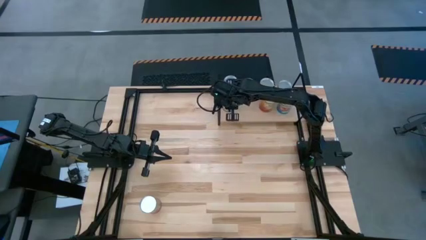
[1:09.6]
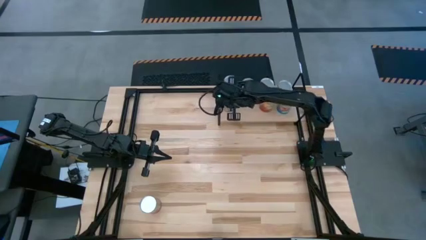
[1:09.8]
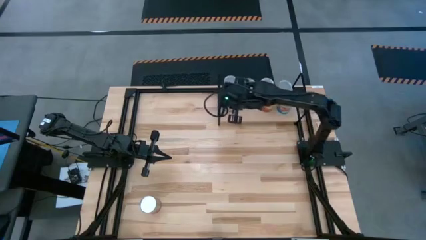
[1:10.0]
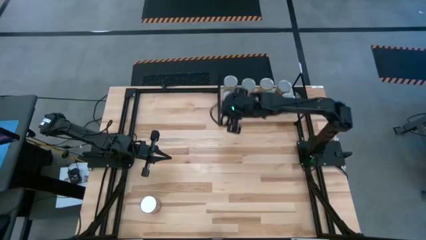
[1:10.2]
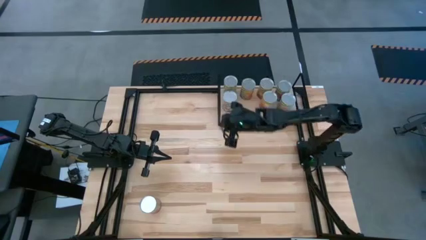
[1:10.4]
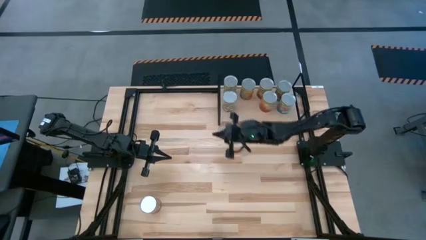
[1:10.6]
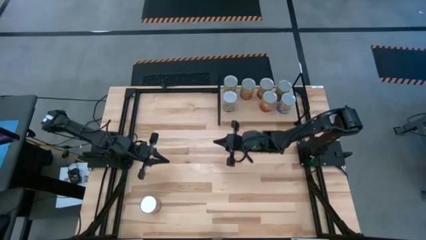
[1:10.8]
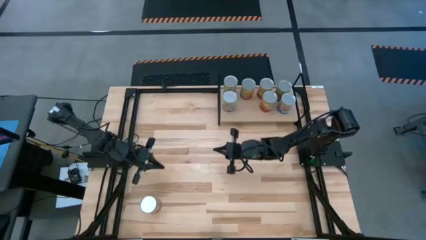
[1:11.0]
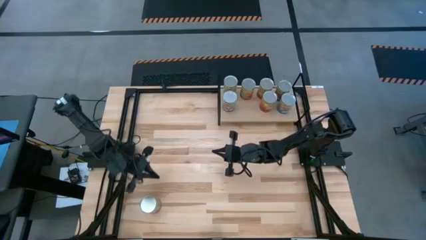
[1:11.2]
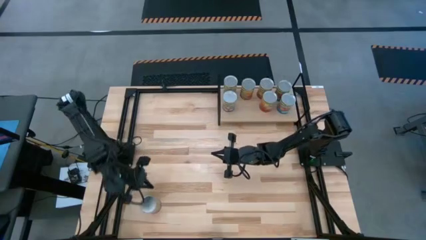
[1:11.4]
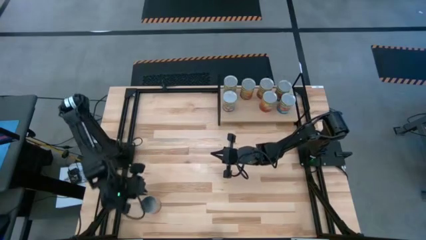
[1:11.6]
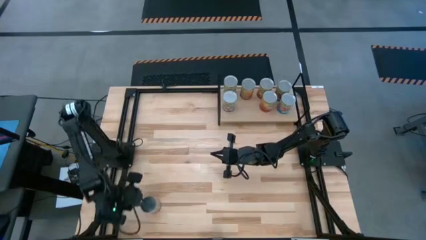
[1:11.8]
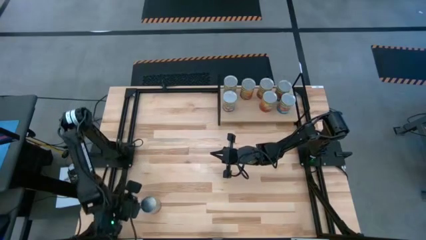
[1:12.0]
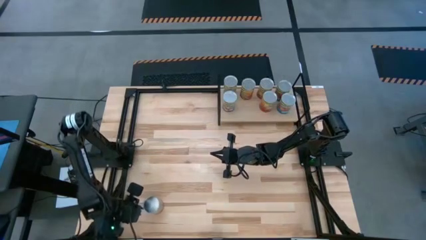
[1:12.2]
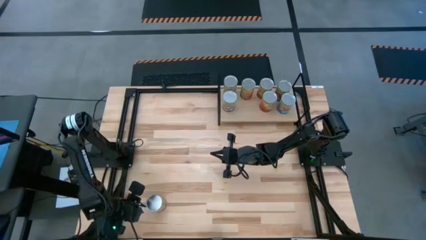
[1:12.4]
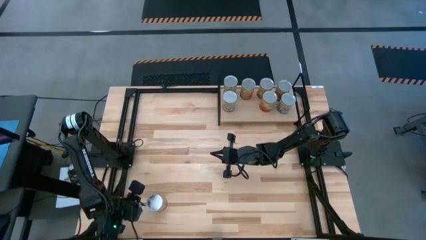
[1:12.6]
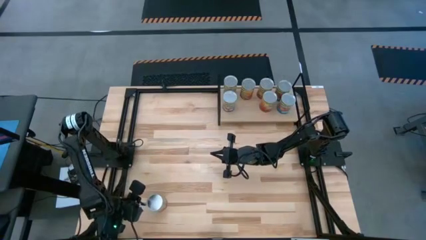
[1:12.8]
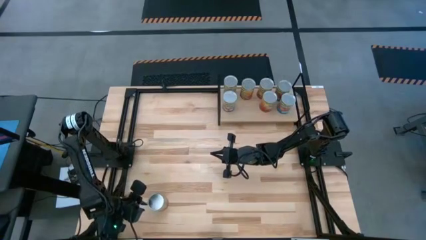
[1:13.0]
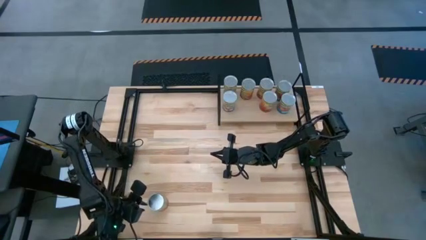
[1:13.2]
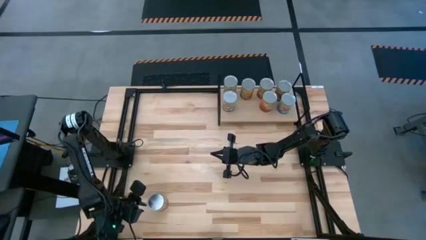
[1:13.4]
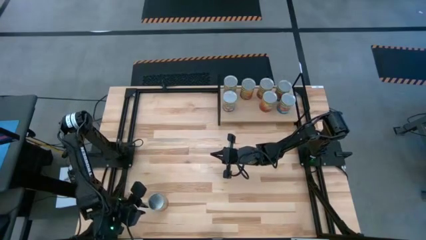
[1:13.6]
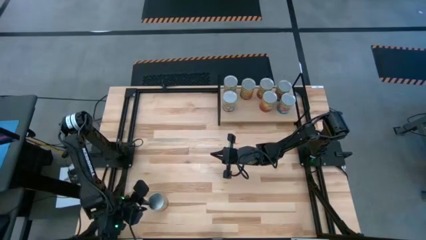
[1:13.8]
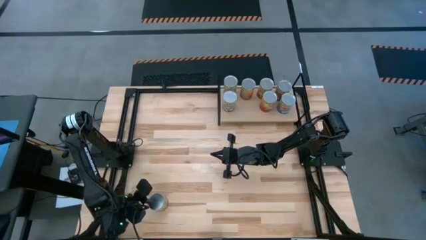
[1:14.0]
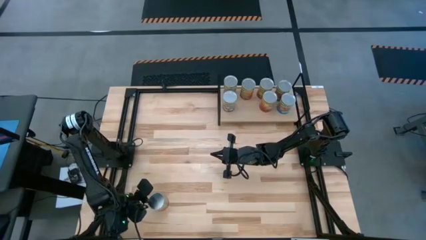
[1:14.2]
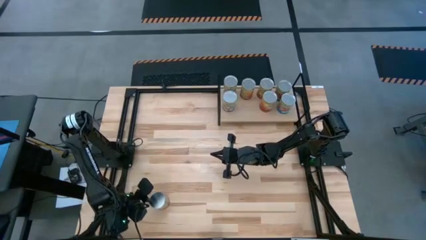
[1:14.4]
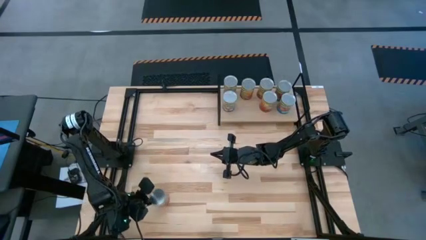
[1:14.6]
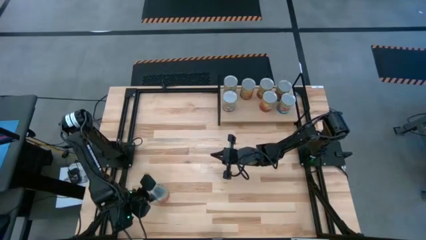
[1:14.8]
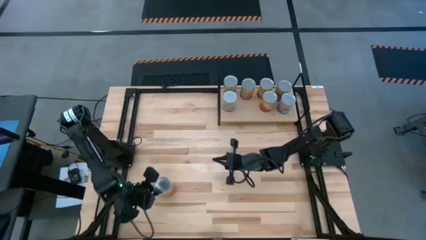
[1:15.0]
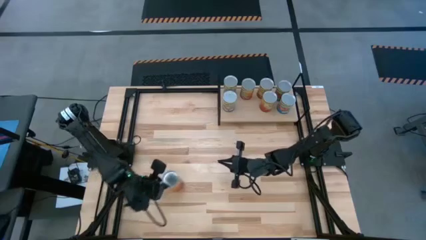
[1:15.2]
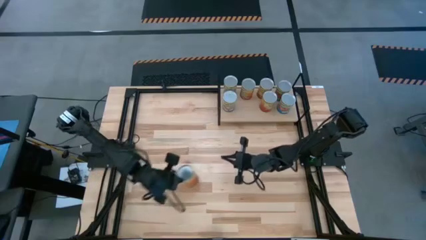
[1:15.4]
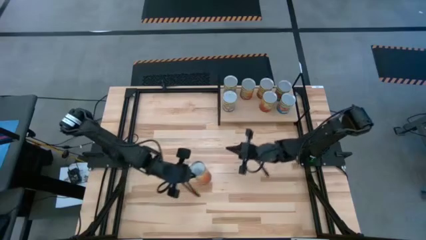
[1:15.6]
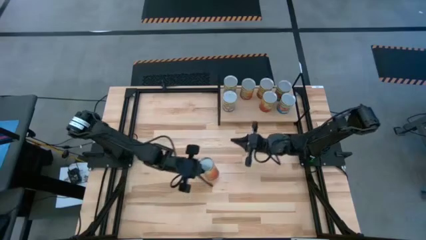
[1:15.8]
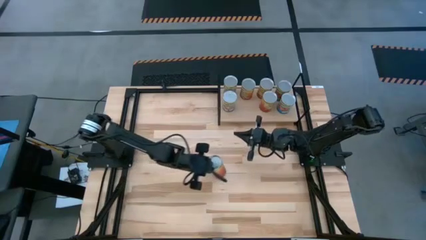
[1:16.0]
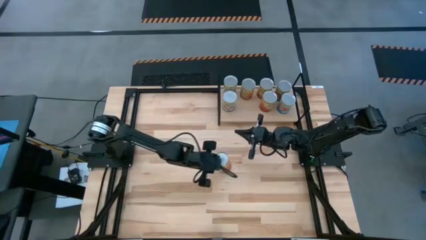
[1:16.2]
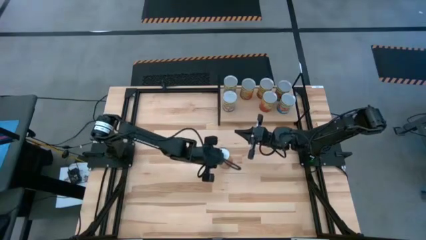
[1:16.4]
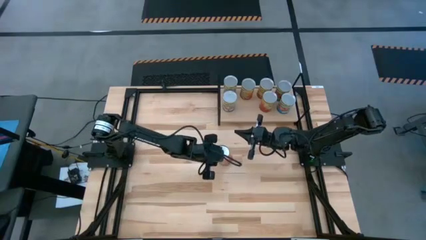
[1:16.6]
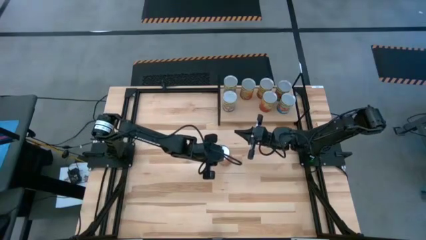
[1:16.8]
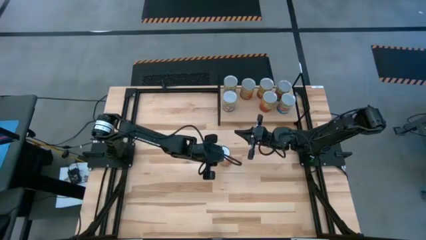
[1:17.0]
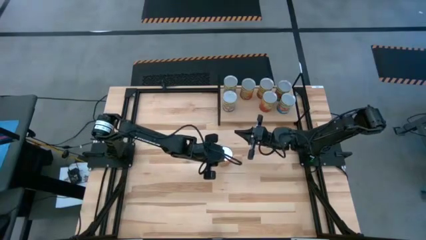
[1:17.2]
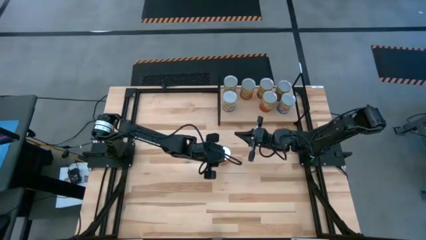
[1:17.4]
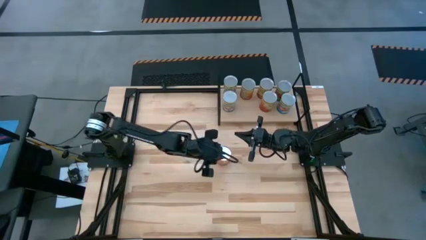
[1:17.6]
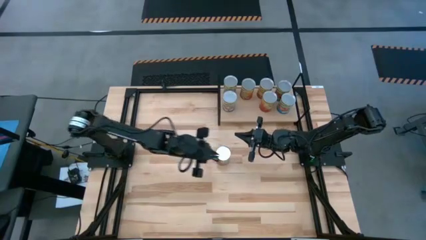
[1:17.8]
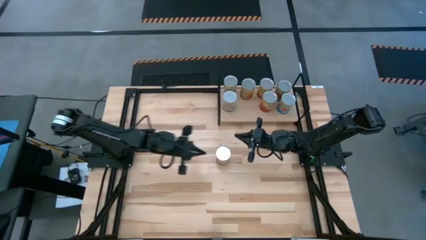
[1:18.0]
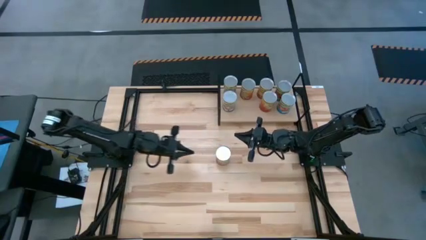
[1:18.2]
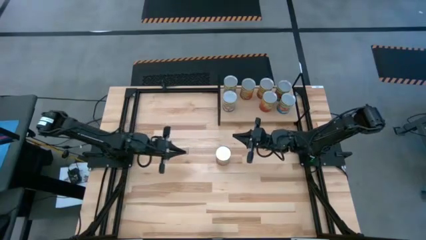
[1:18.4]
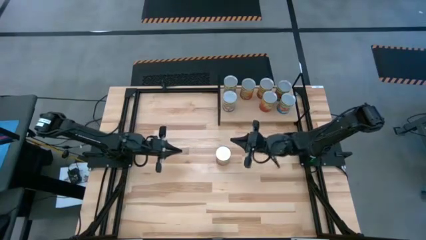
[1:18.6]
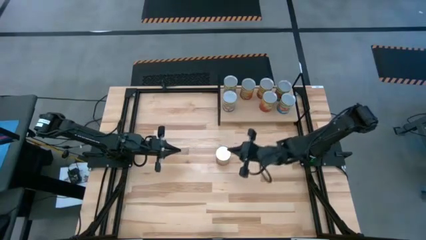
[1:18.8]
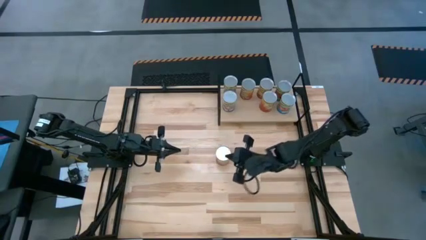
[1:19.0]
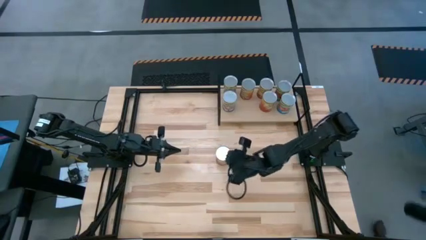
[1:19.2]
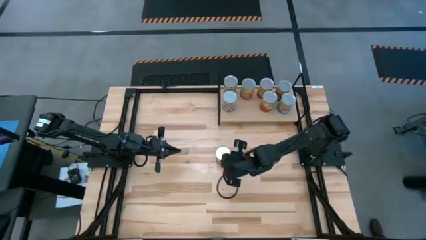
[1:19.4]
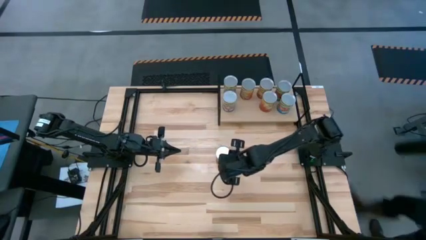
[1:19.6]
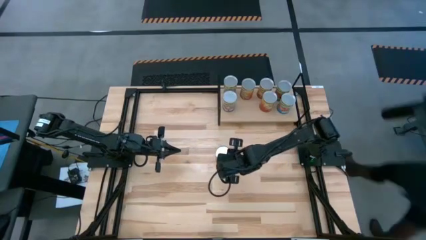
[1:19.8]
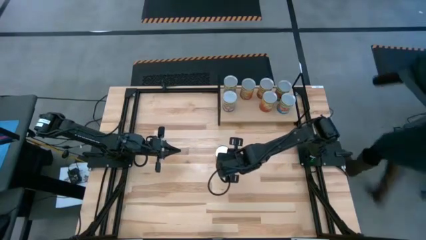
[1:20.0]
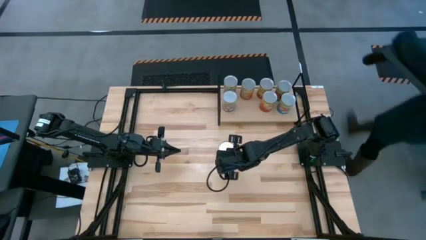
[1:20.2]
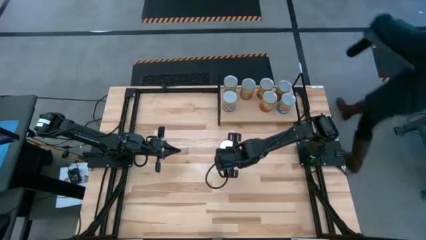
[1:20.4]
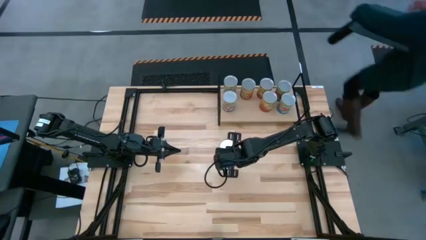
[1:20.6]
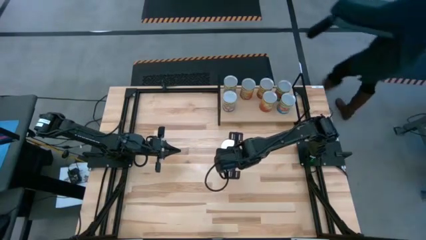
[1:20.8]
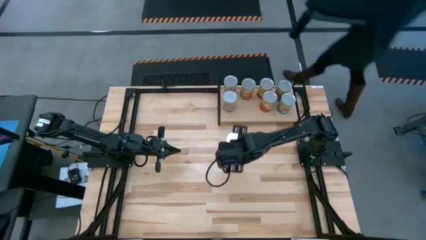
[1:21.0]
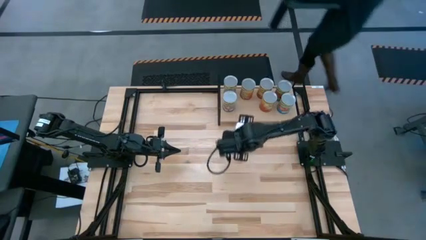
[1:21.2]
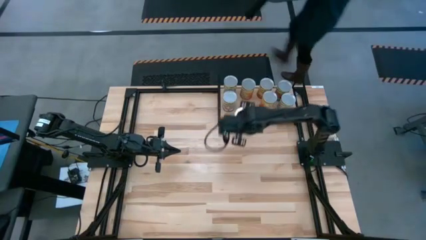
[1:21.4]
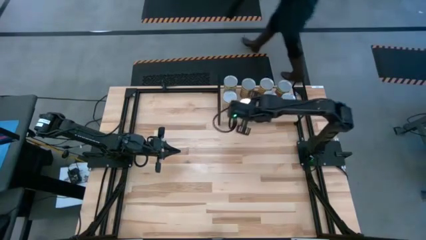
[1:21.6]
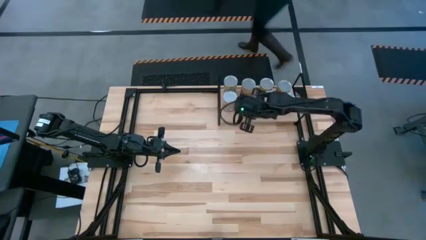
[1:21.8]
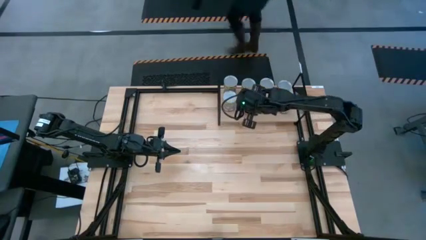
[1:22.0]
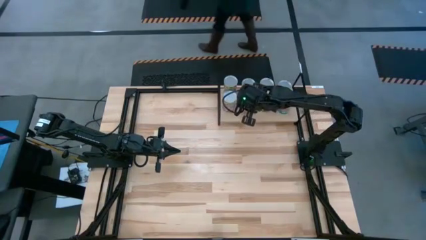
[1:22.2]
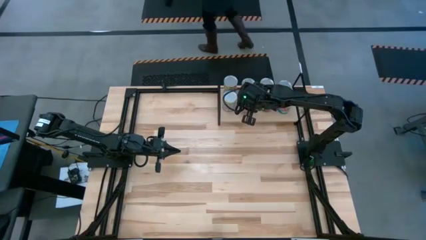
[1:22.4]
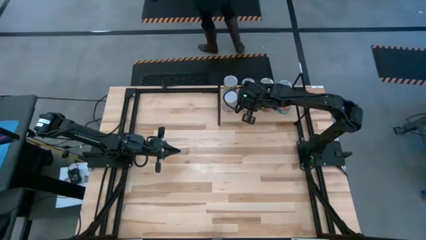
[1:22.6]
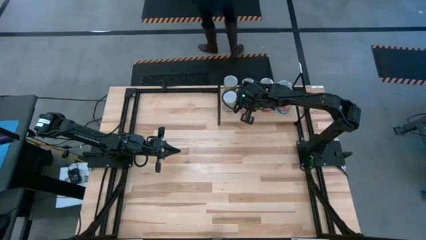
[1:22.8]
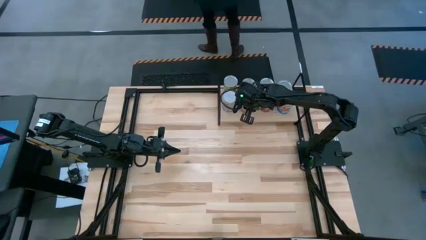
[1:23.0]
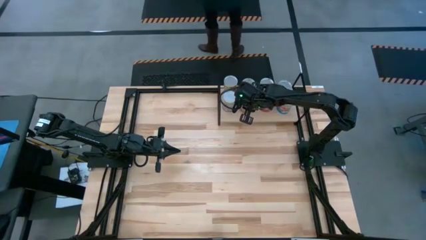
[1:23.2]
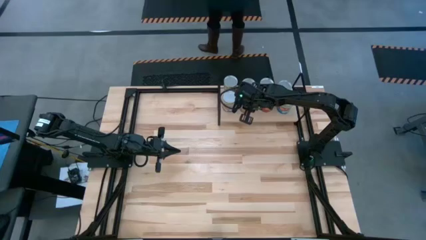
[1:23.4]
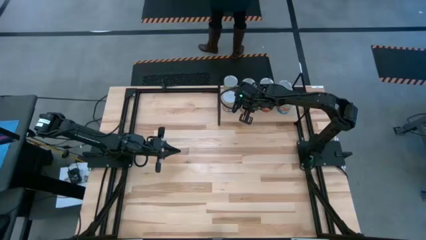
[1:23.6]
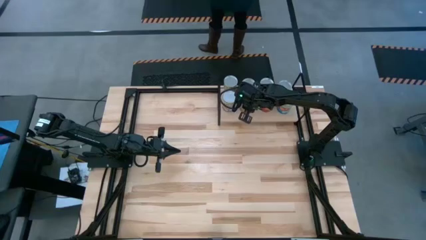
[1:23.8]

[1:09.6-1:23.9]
Task: Pick and place cans onto a shelf
Put the canned green beans on the shelf aligned with the other canned green beans
